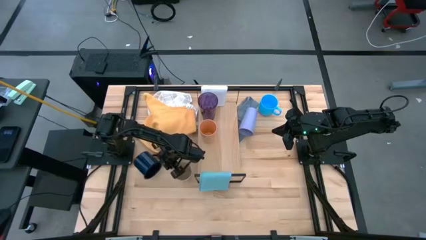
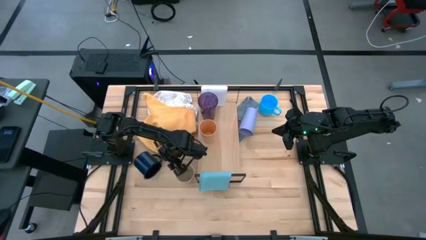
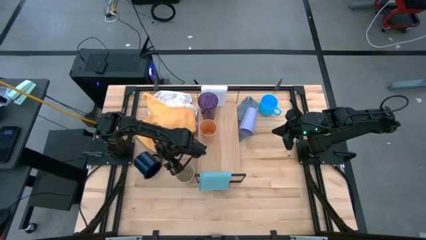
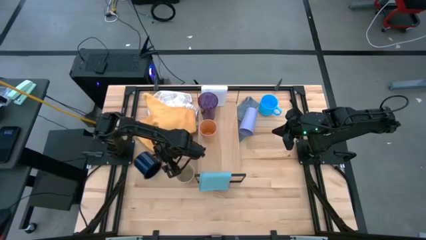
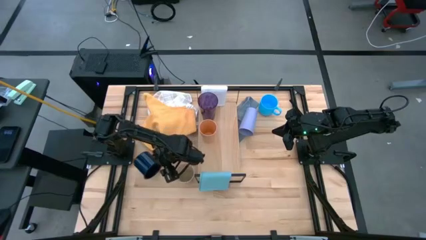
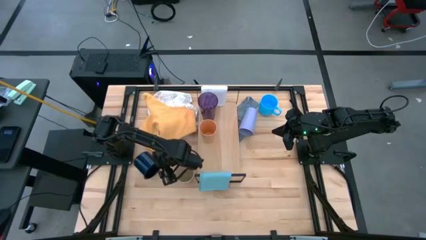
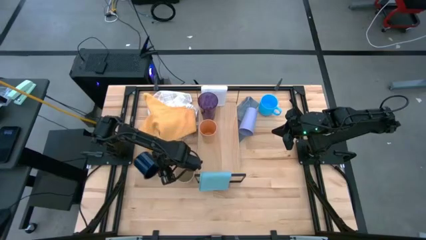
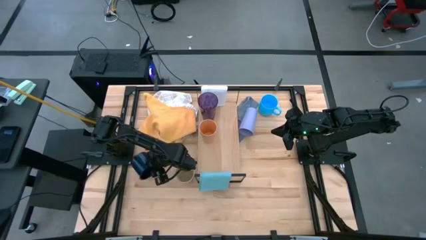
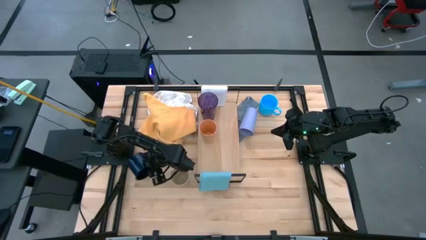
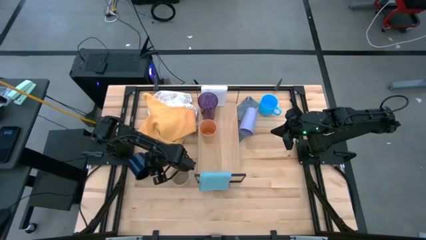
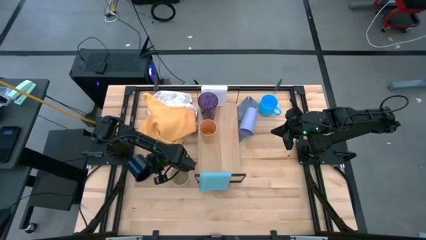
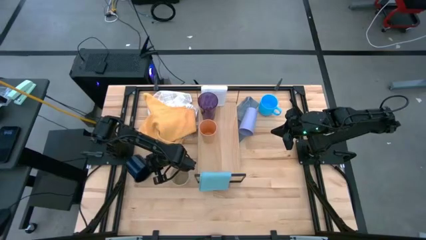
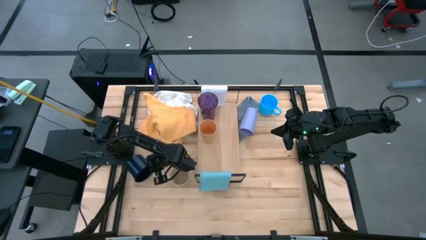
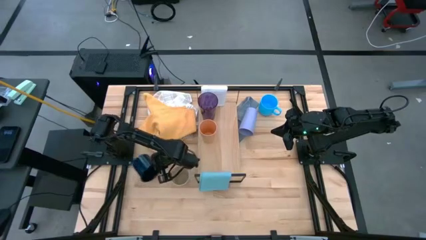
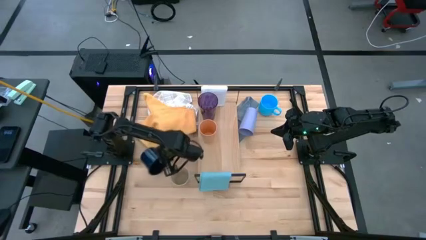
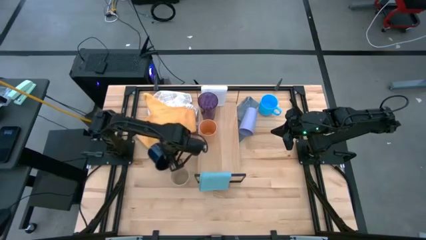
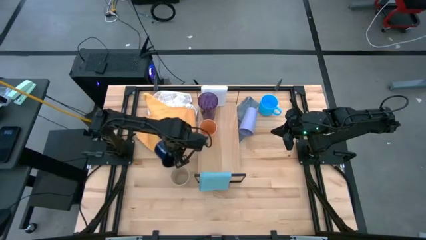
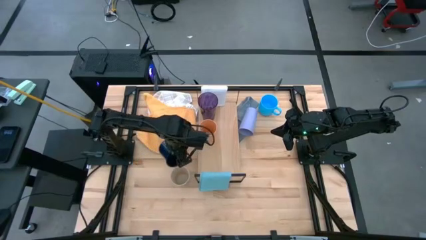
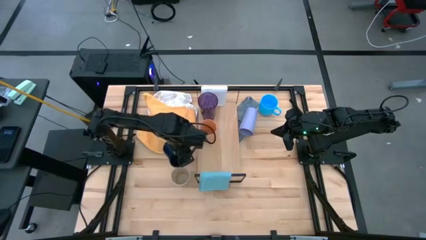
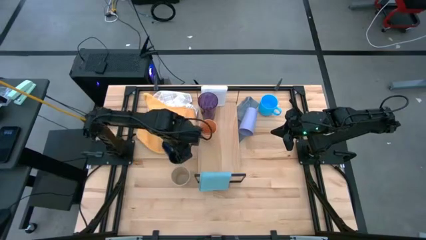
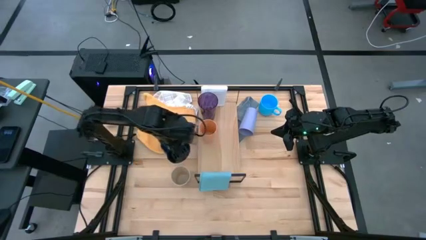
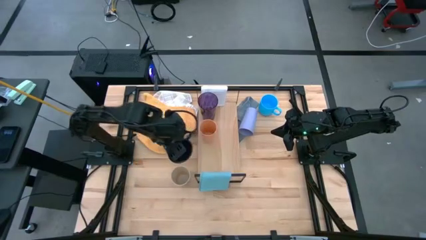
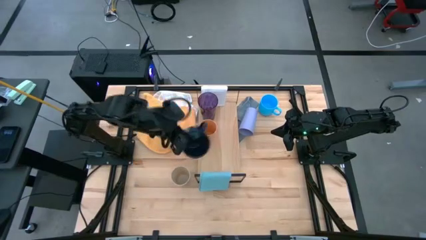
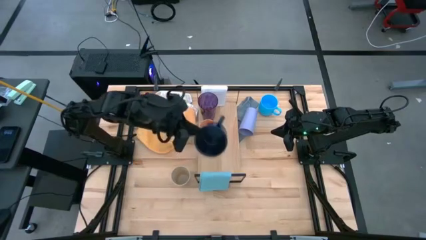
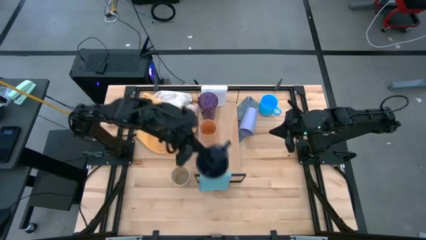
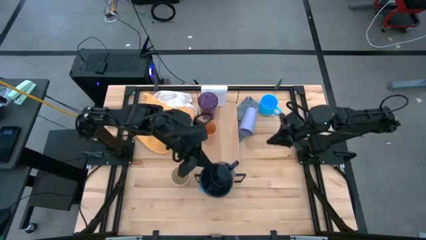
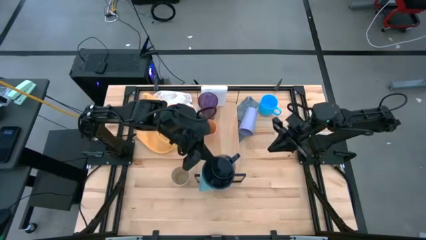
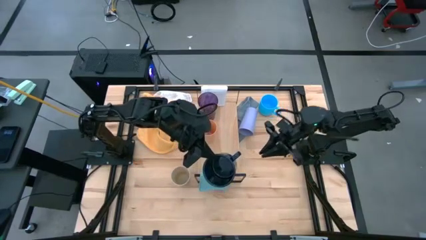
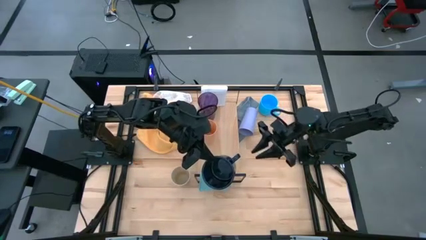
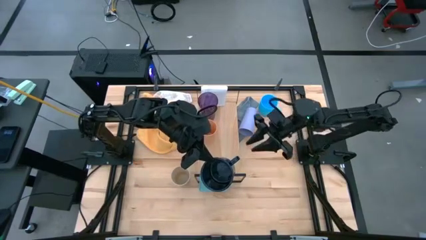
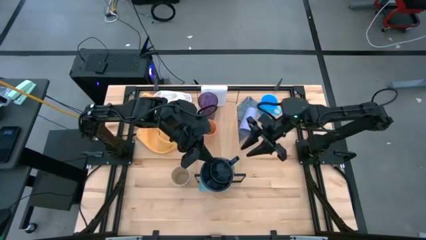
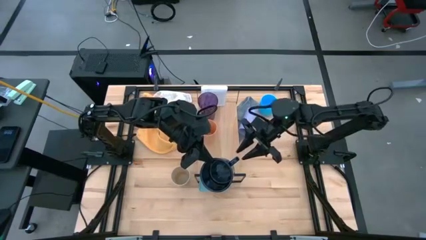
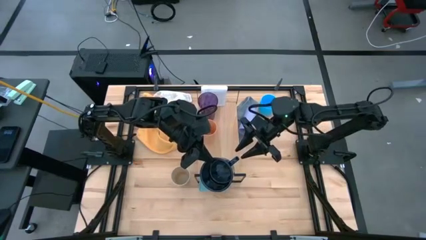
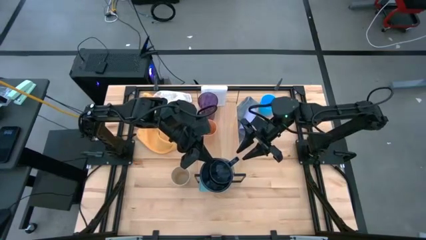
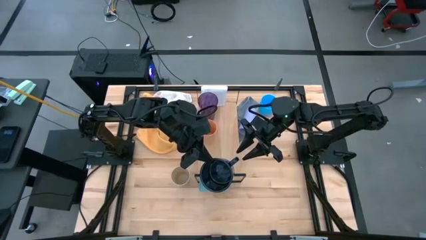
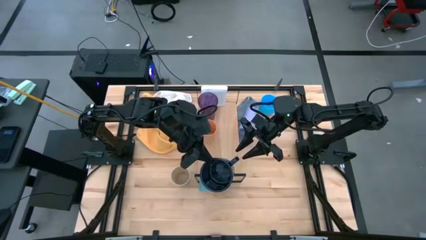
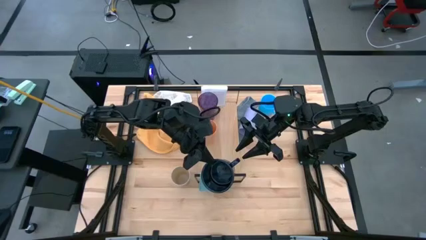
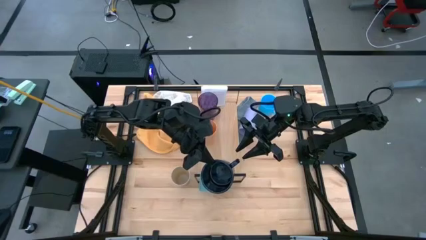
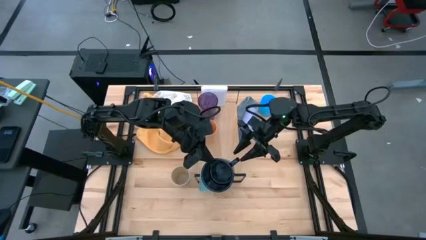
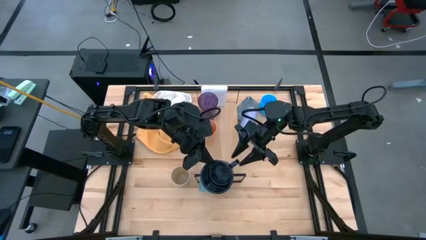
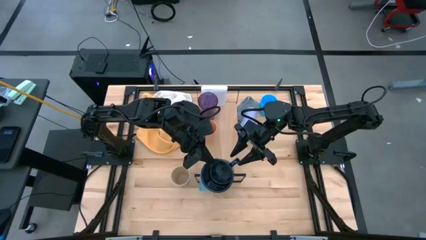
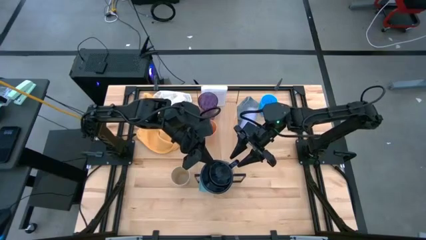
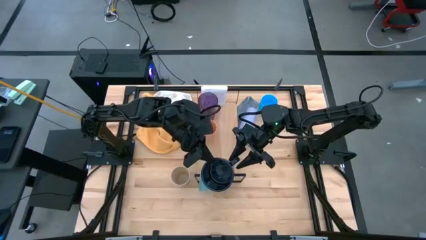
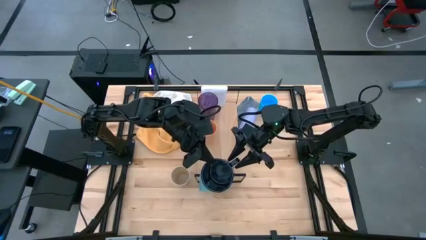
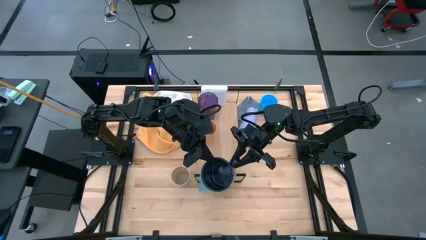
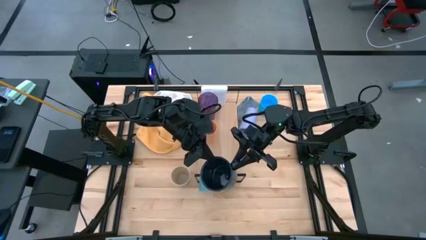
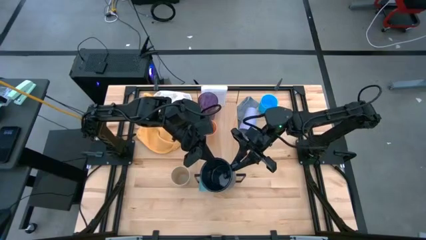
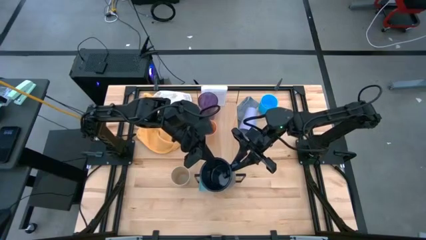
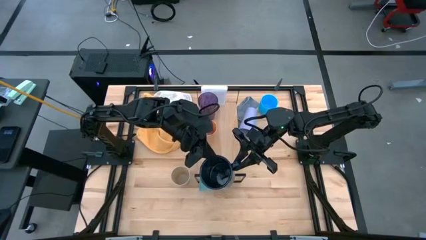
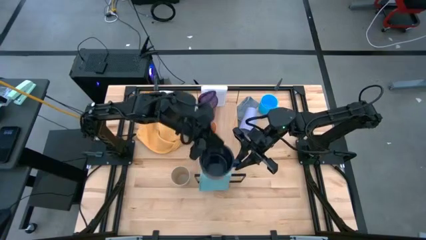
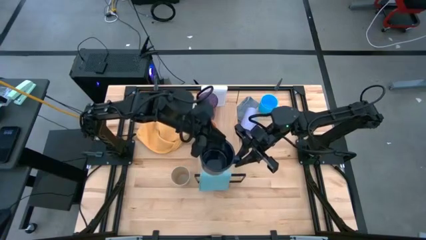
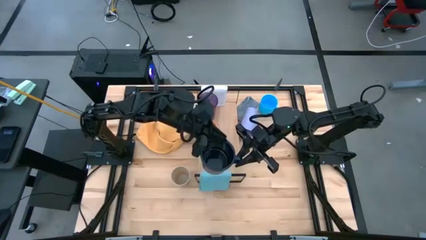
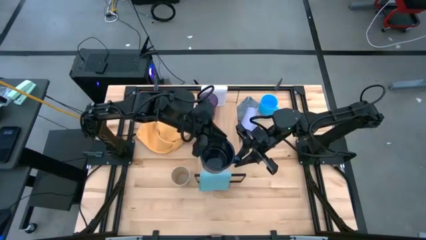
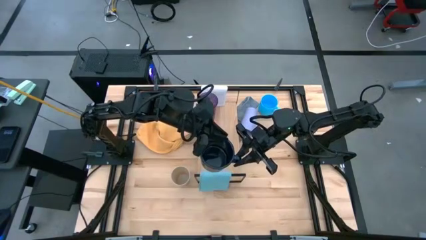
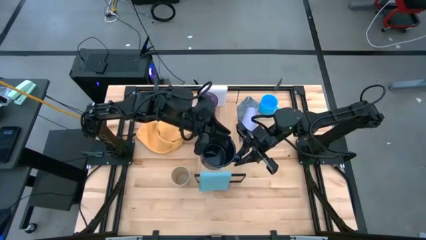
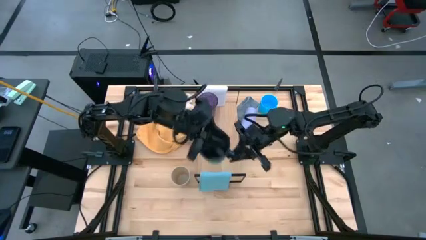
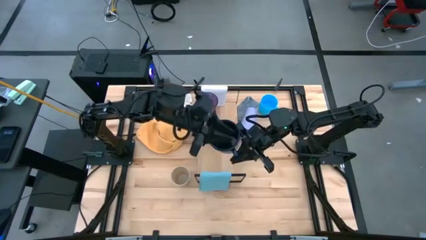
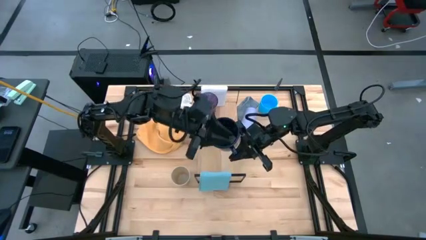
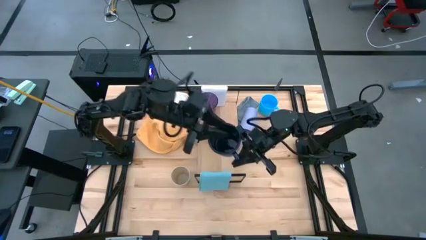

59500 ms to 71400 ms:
Task: Stack small to large cups/mugs on shelf
Put the dark blue mug on the shelf

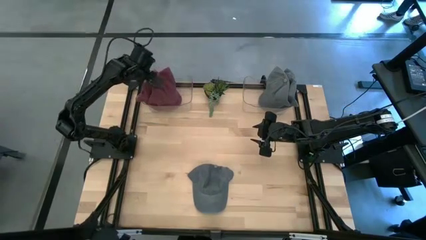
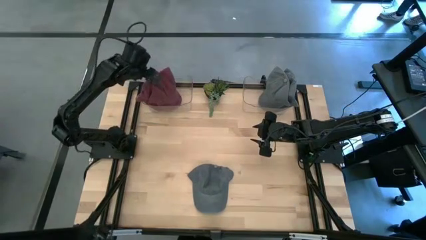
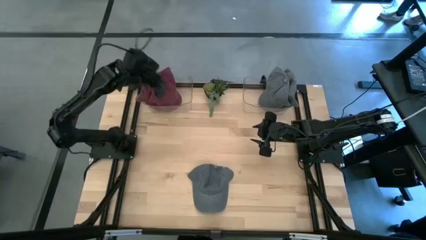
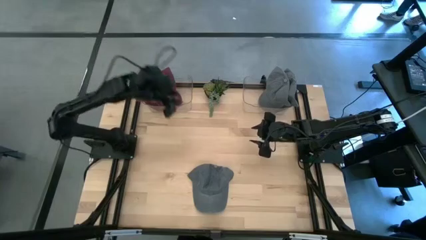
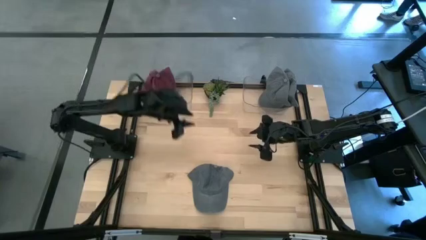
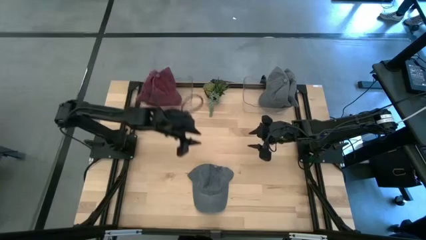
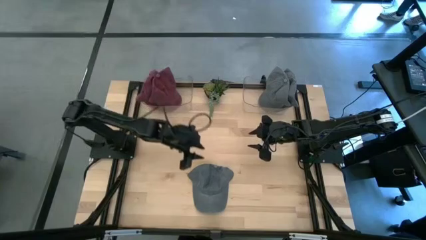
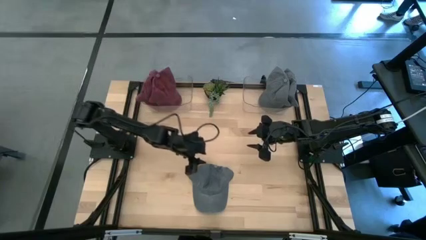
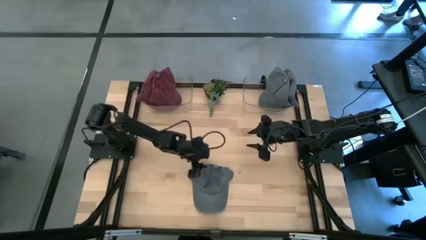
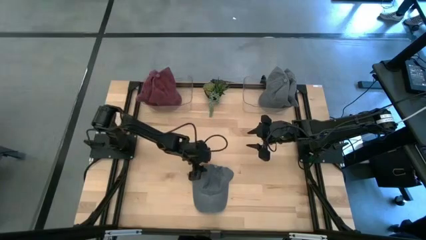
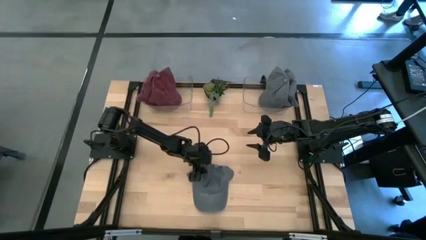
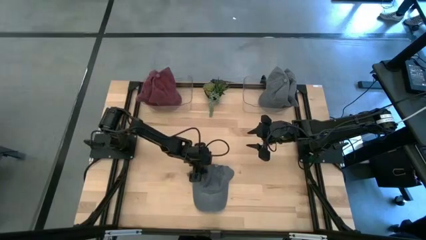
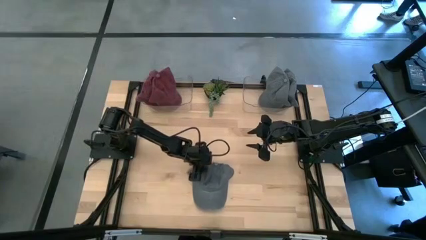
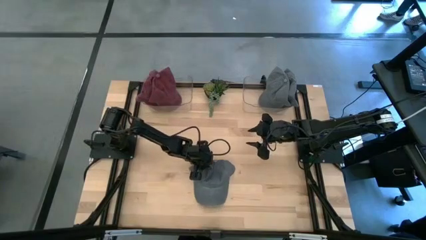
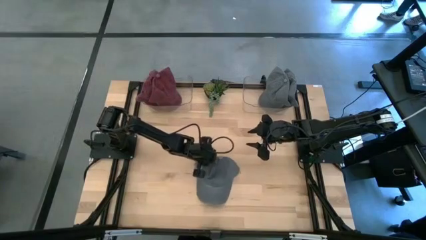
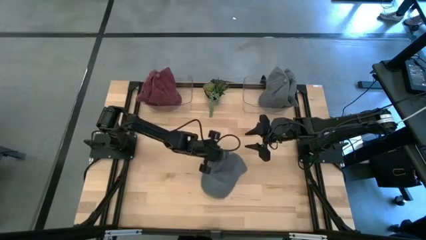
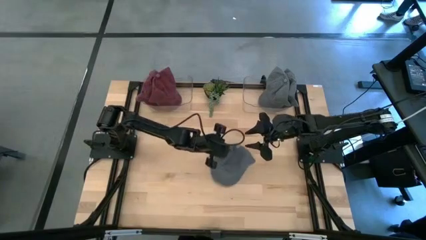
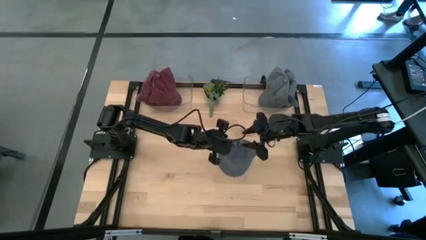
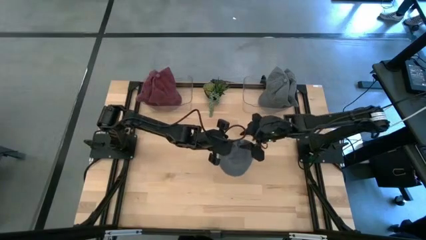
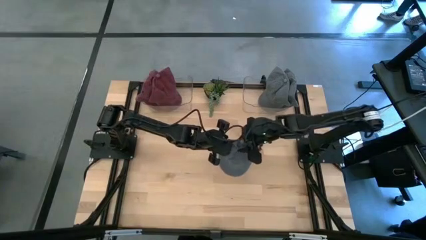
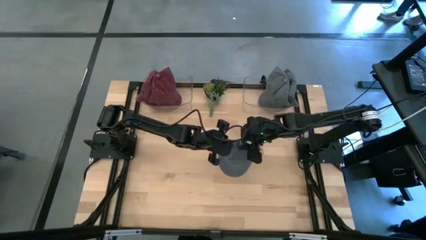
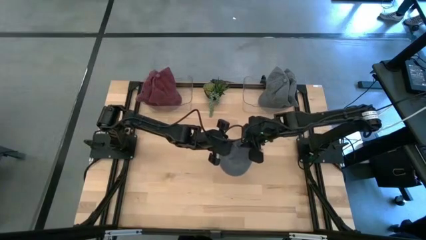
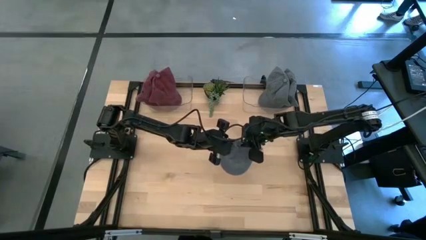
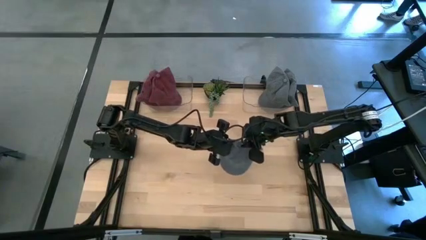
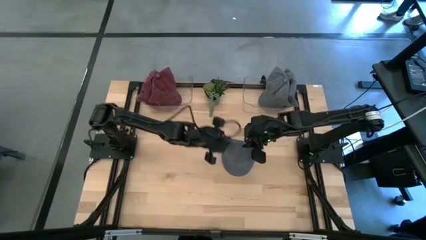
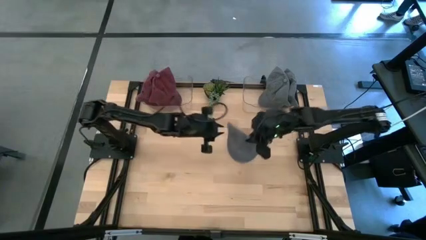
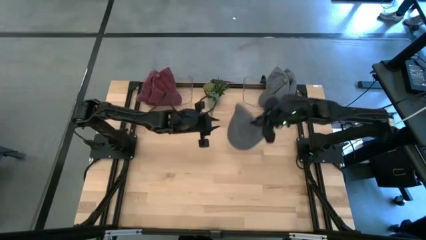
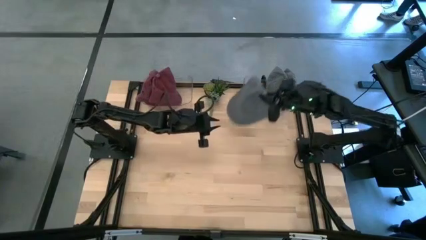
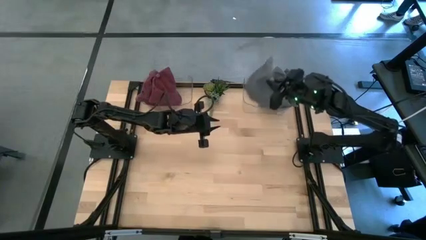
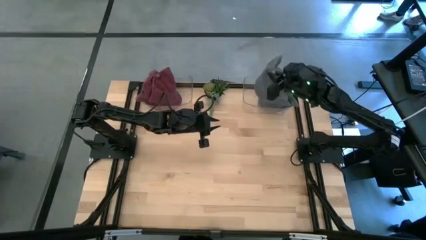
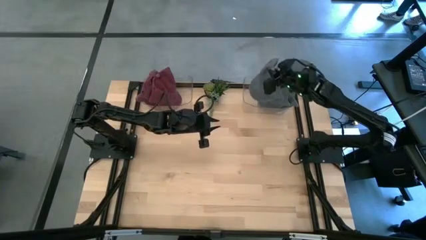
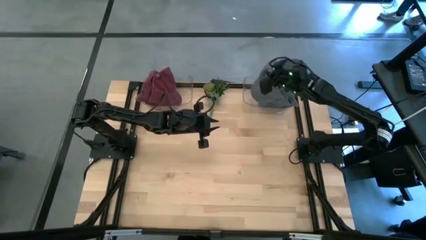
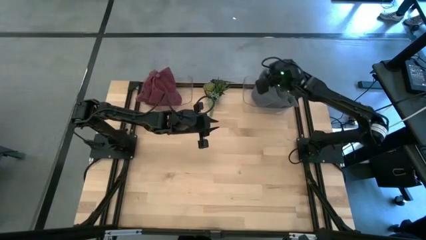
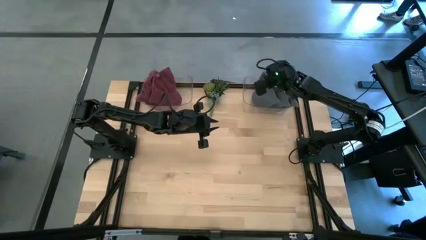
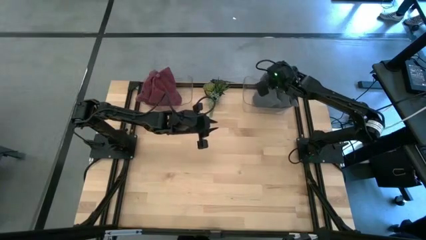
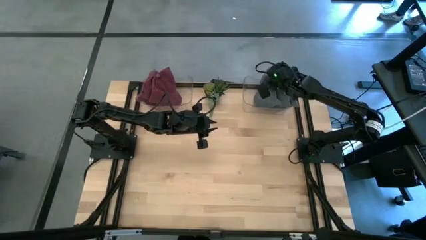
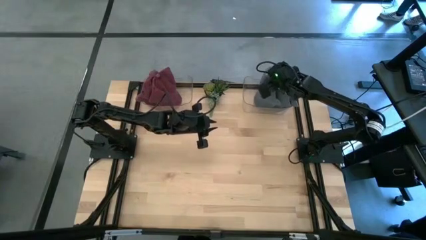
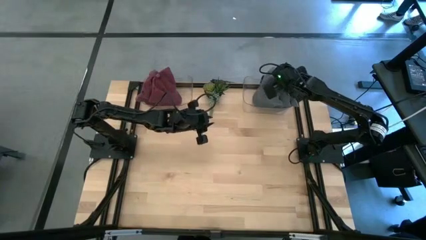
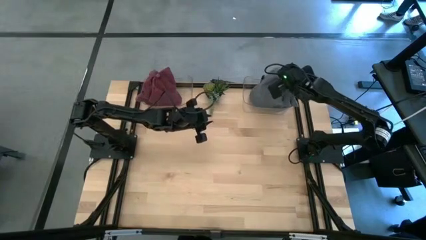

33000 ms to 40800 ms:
Task: Pick & Place hat
Put the gray cap into the right transparent bin
